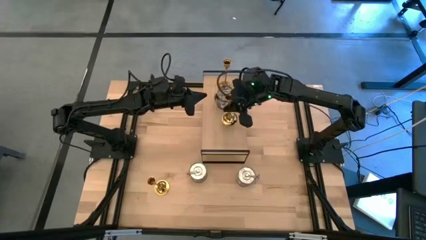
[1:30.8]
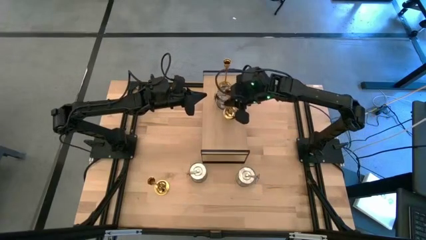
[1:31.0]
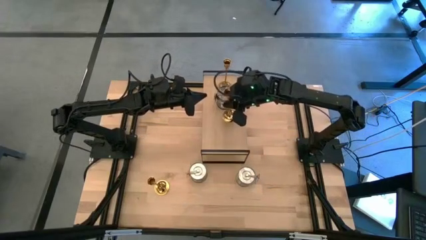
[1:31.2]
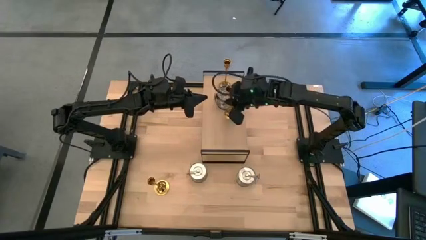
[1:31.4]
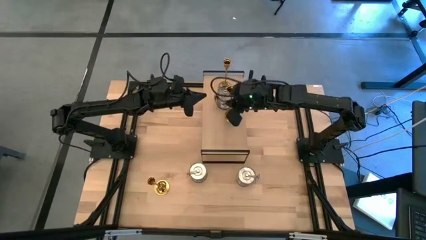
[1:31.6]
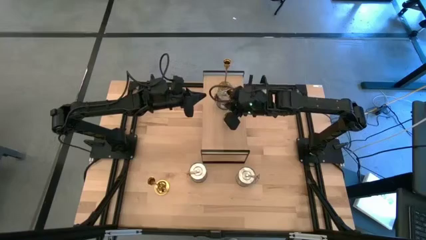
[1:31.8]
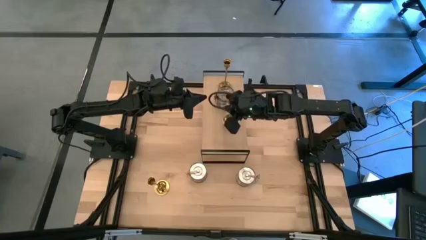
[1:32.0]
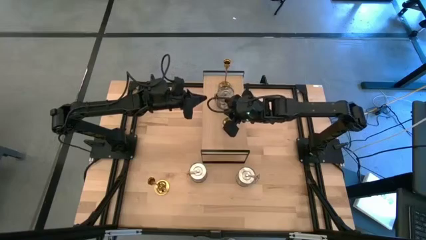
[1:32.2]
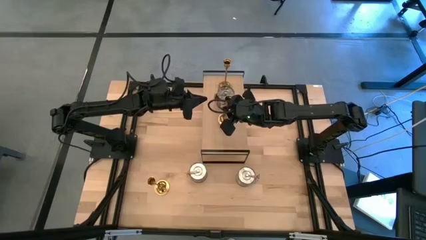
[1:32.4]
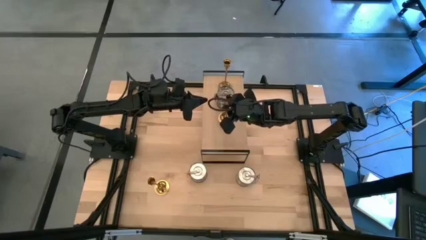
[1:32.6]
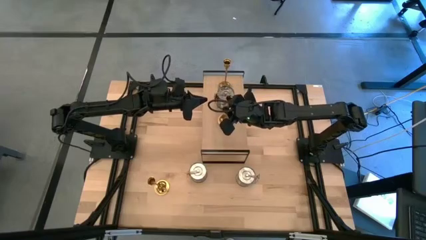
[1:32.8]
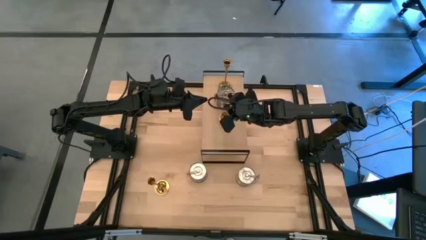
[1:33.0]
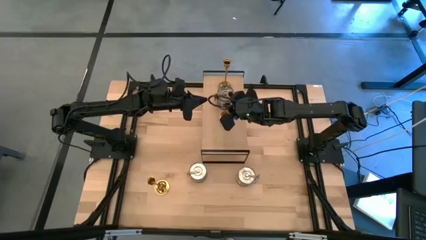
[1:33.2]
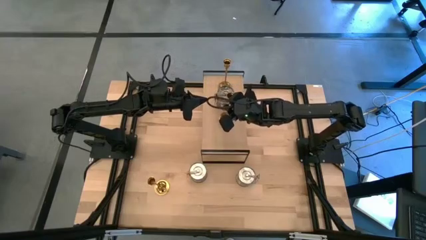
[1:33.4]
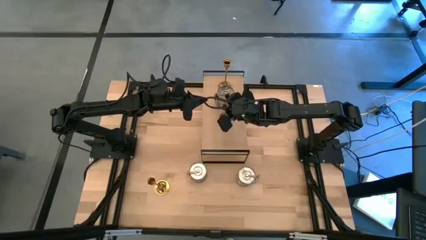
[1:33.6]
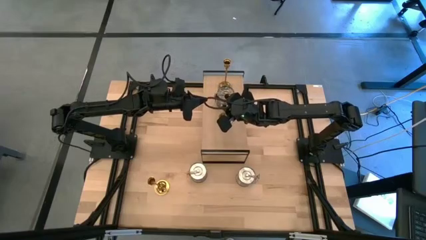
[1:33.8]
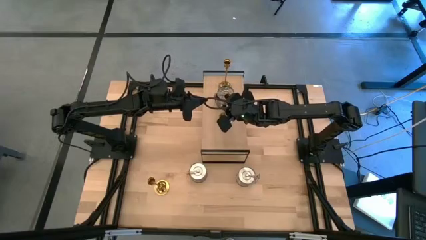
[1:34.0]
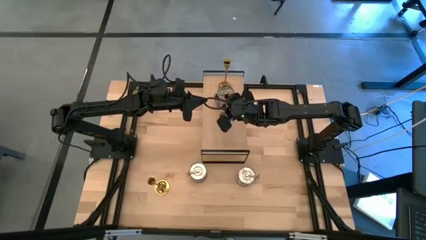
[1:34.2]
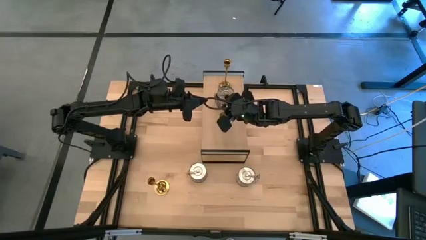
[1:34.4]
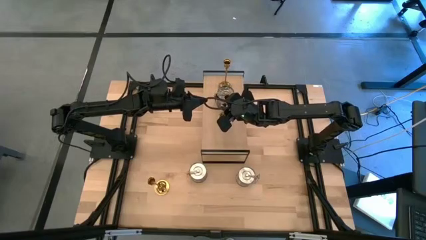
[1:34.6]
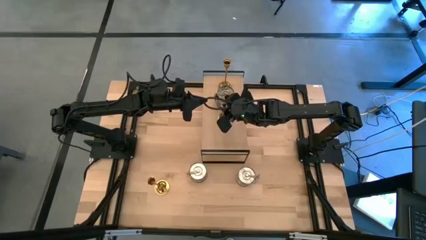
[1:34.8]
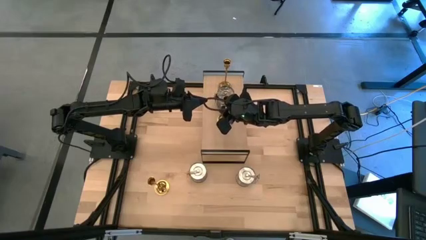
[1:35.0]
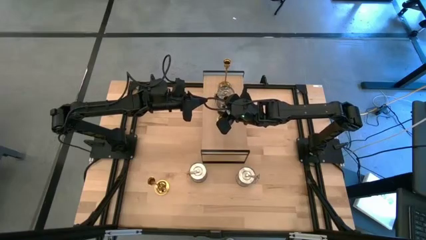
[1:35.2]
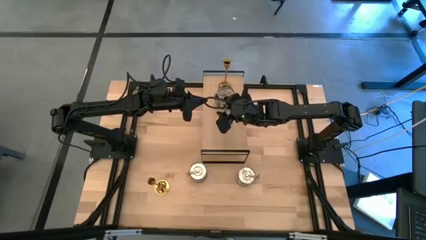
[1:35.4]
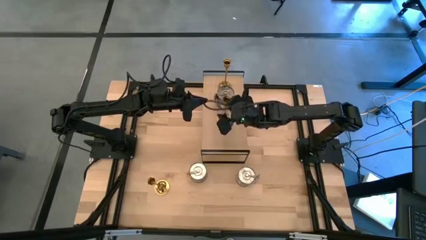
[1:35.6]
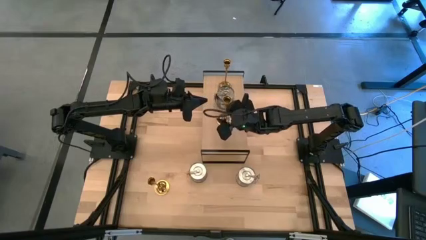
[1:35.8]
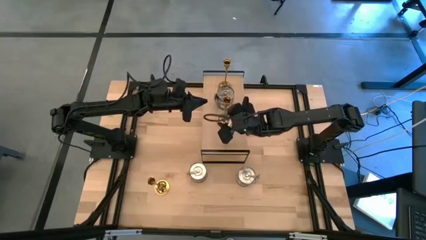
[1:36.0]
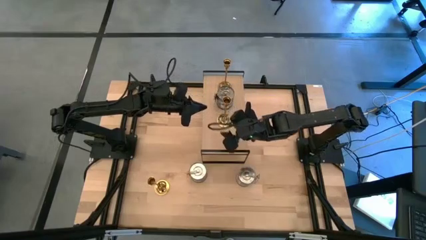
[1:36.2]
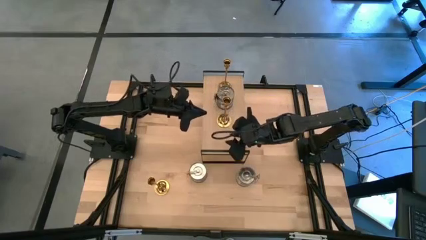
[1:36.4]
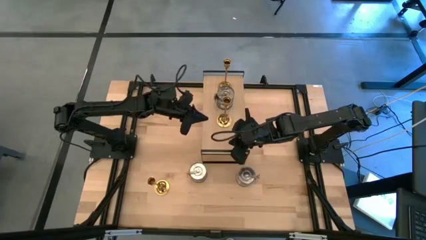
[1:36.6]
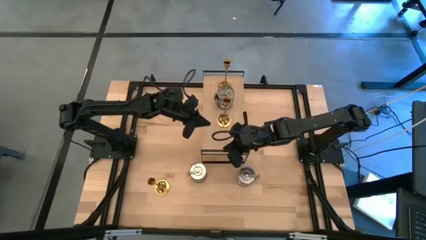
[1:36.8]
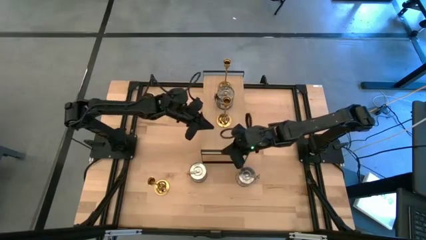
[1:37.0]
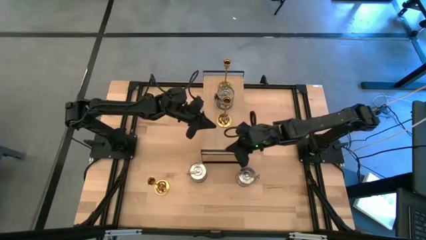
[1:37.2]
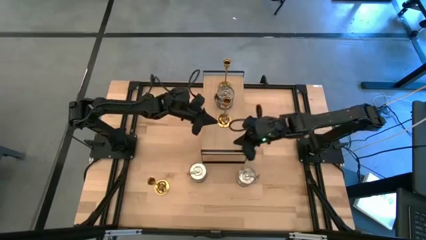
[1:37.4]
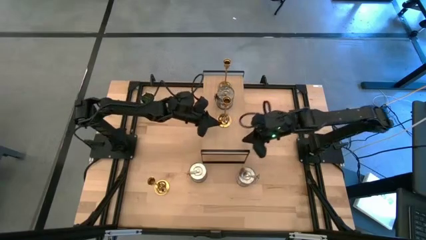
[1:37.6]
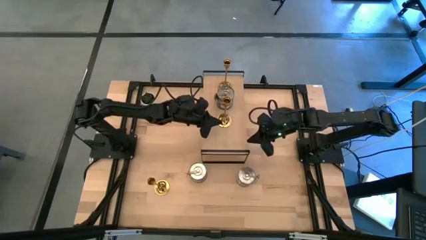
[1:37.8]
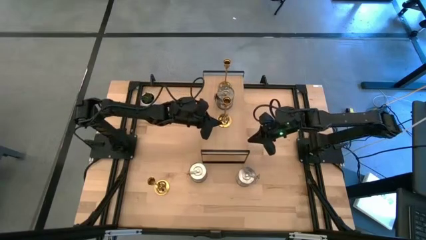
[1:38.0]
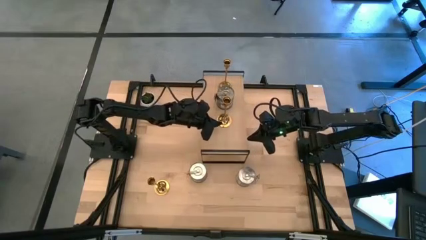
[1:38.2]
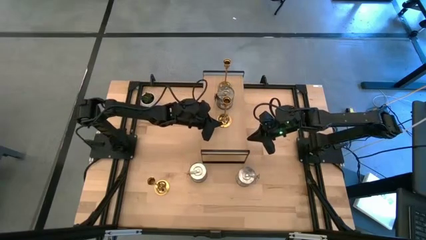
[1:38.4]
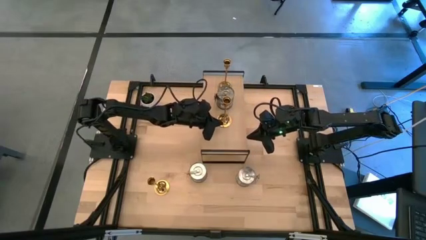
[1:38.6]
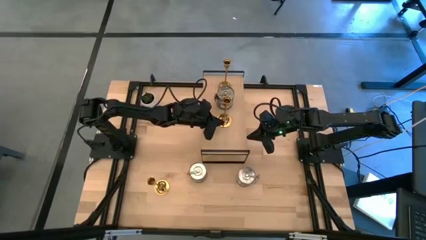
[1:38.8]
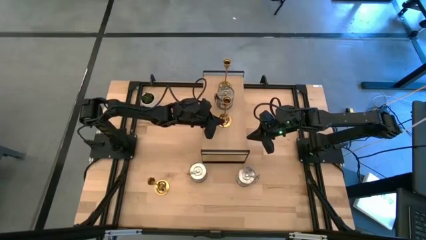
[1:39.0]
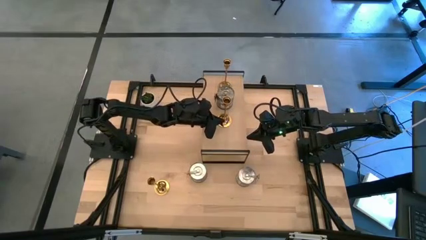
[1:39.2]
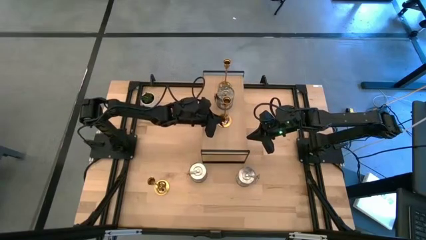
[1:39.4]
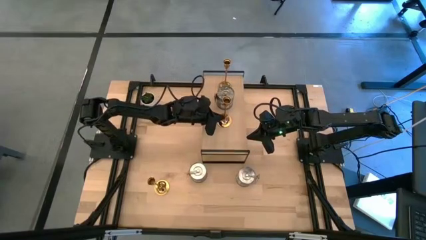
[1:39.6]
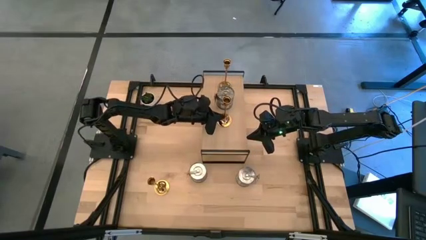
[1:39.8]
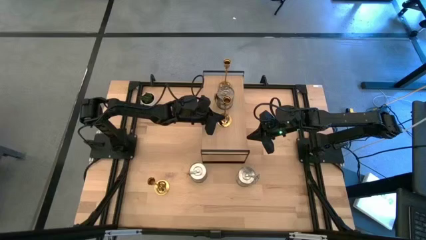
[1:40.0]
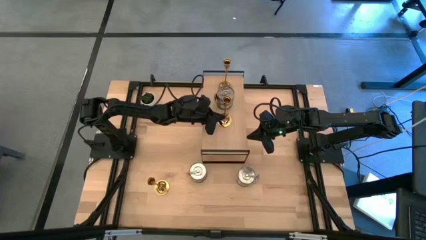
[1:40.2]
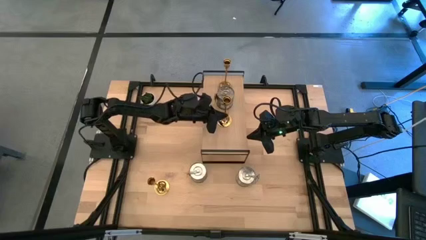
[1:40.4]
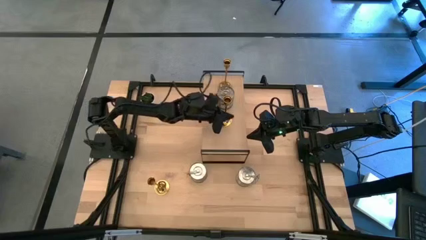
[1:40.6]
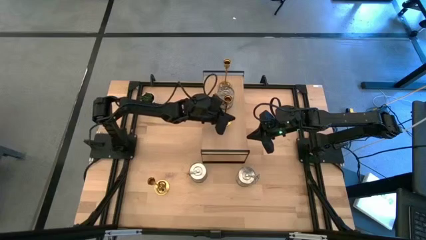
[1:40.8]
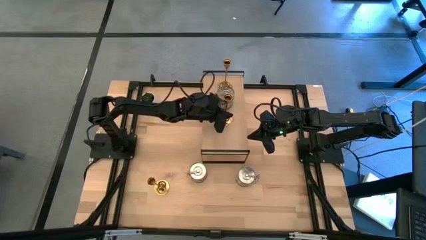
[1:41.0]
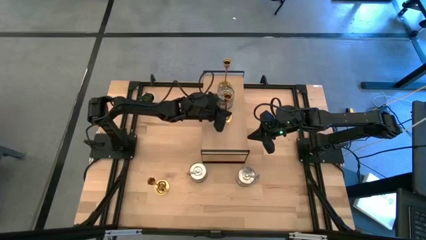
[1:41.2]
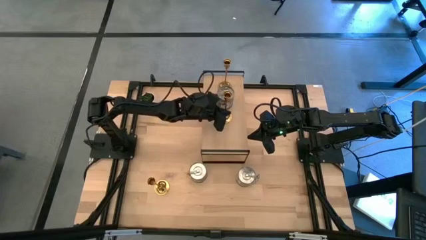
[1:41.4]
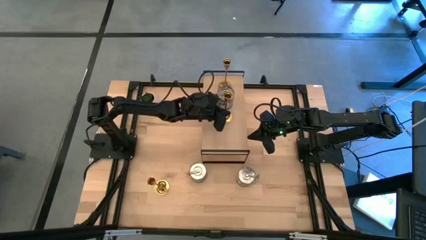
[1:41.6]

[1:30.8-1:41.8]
Task: Pick & Place candle stick holders
Put the right gold candle holder on the shelf

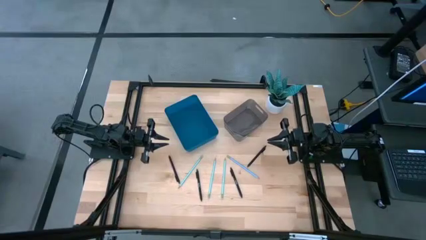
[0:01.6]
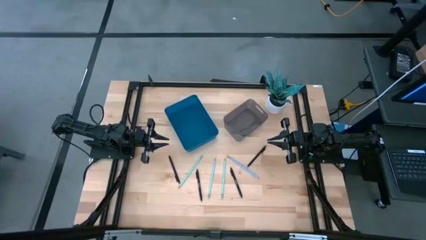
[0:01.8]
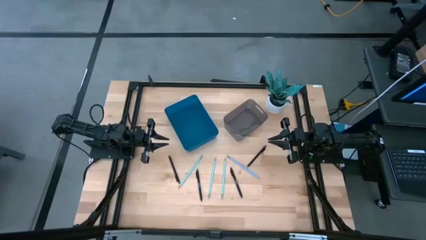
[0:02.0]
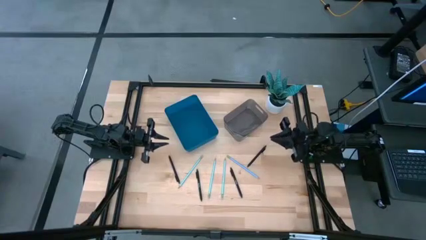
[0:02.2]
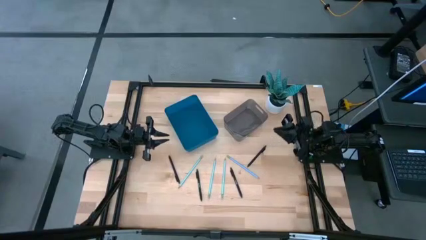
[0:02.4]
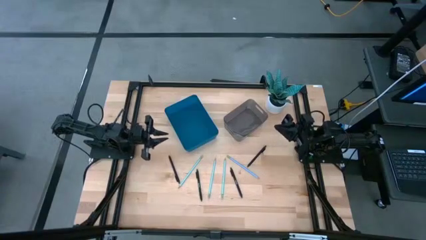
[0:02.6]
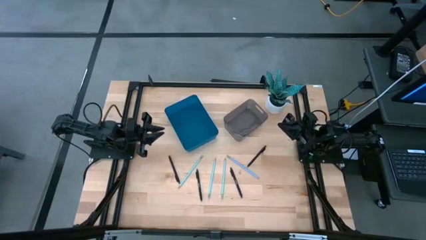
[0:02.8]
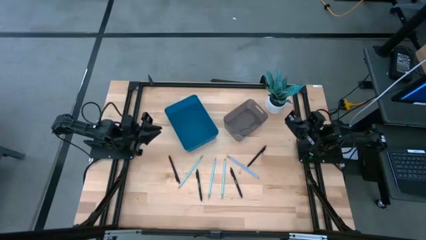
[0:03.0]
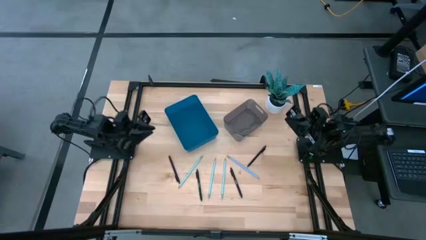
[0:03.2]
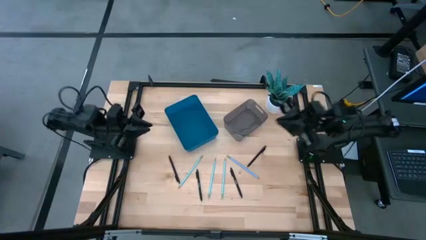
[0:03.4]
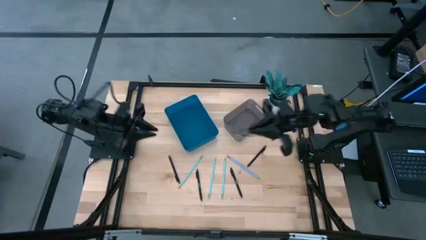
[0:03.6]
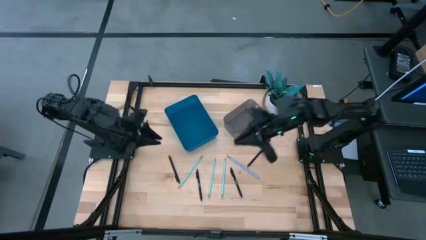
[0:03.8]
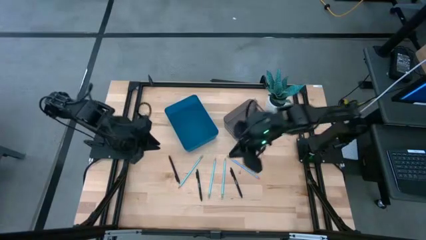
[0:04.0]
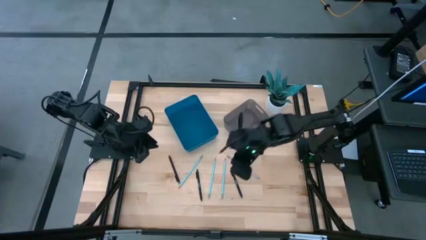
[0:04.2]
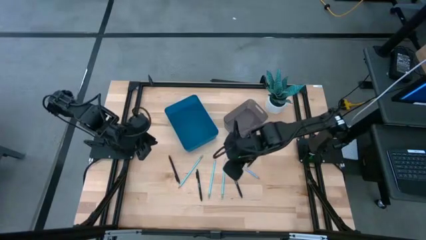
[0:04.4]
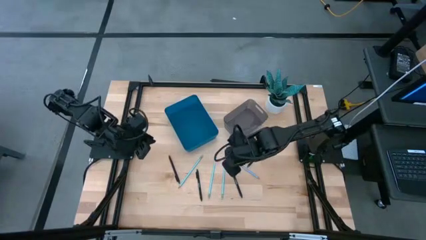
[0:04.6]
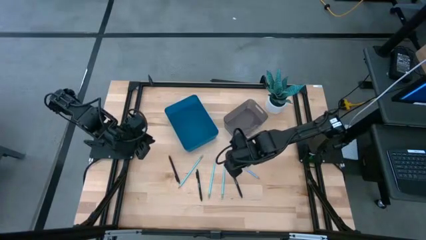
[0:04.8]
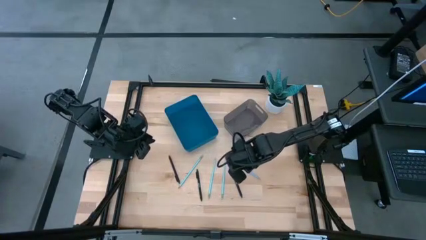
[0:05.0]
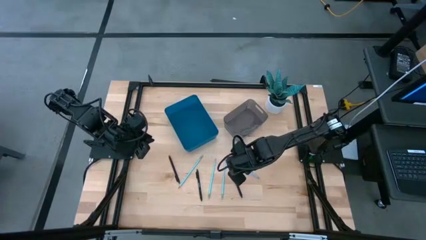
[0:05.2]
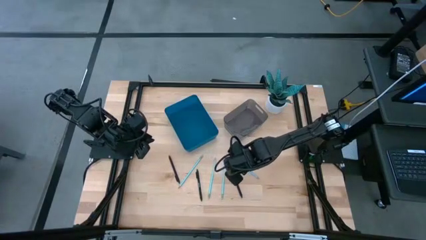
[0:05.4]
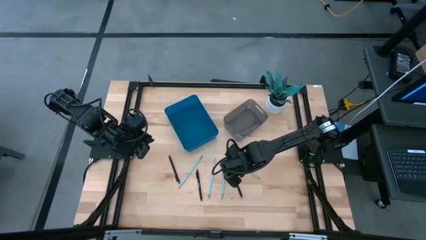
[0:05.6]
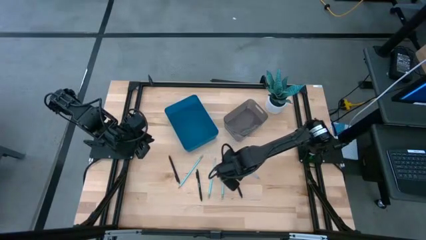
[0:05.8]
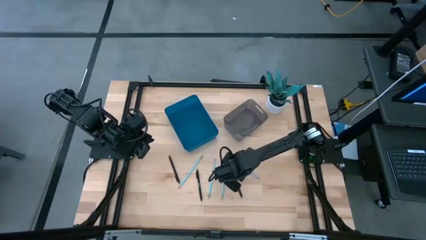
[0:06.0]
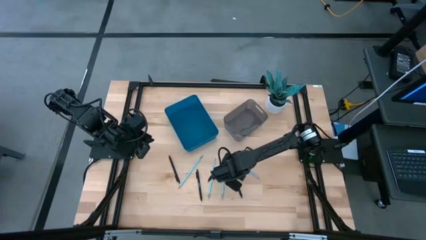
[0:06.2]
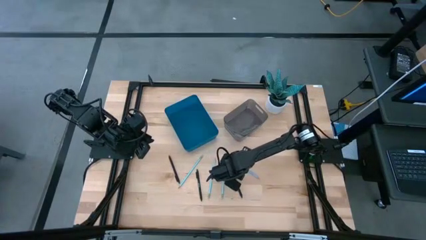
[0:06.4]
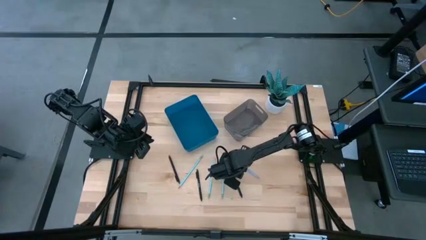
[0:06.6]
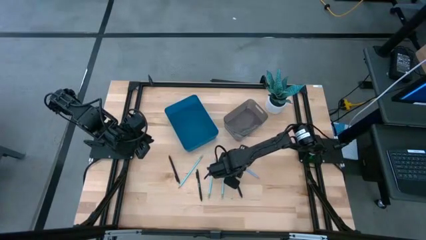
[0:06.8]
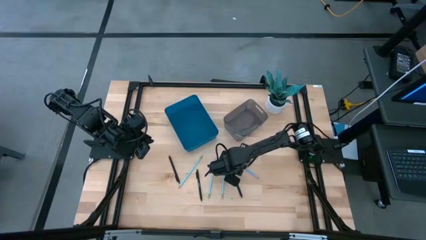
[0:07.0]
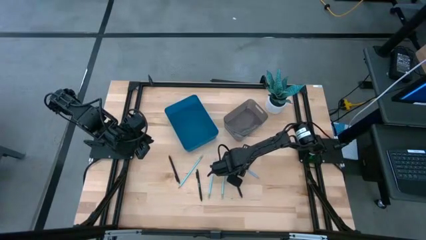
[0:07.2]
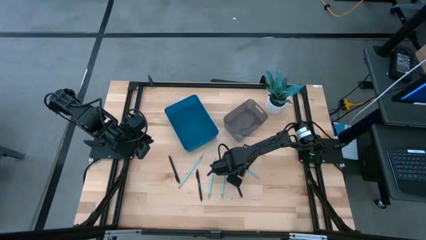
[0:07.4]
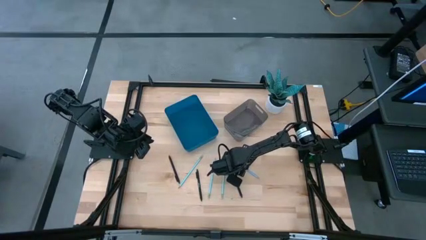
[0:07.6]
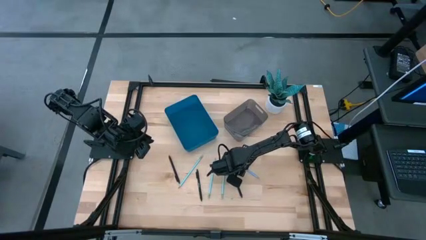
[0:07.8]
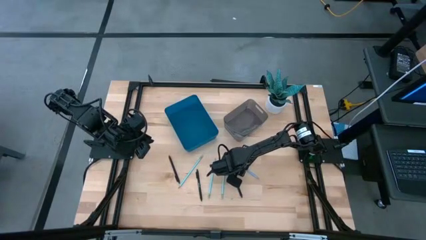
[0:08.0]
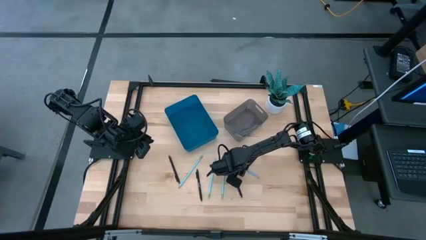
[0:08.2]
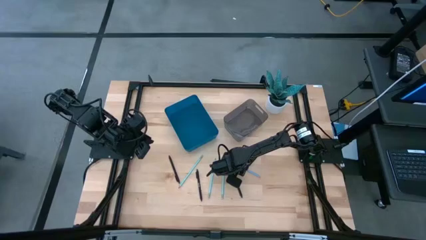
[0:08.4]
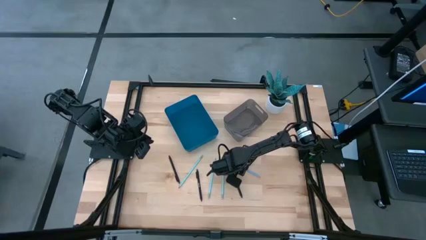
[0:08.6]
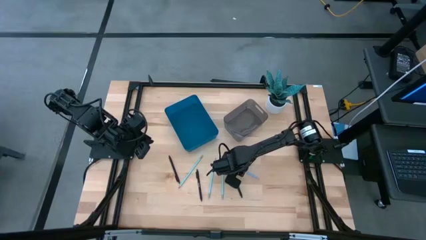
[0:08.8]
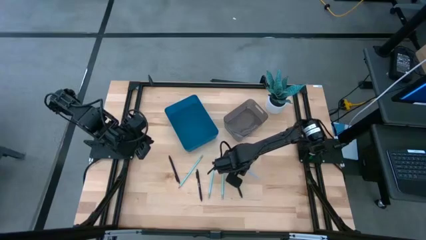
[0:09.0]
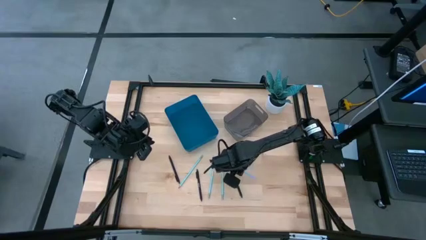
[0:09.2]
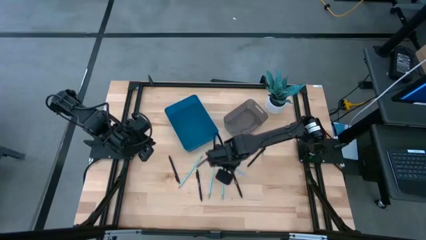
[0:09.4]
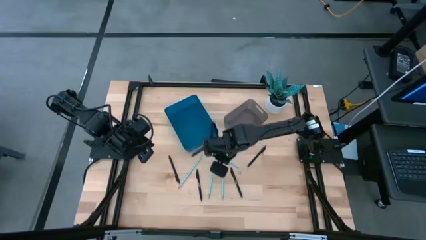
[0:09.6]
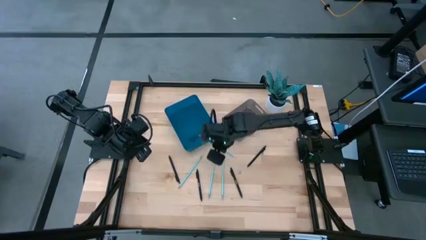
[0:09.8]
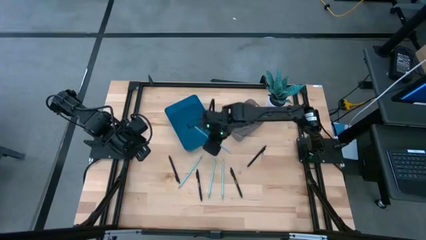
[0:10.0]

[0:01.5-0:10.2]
Task: Sort pens & pencils
Put the blue pencil into the blue bin
